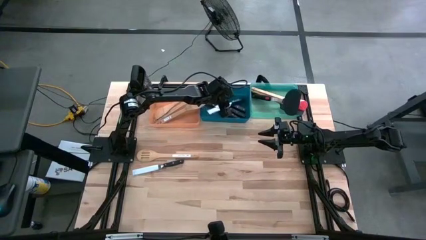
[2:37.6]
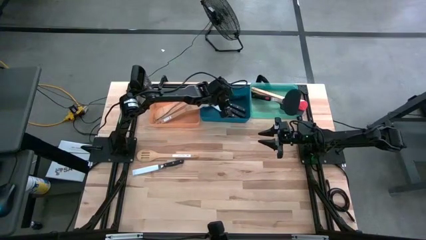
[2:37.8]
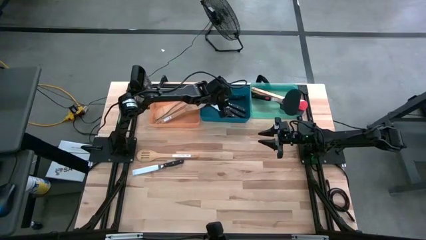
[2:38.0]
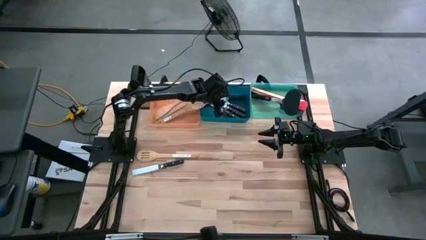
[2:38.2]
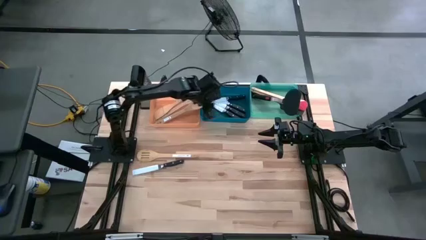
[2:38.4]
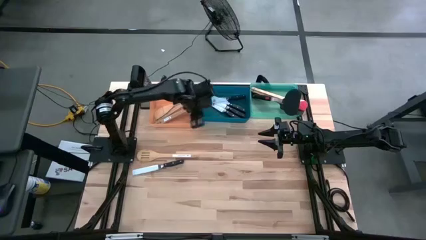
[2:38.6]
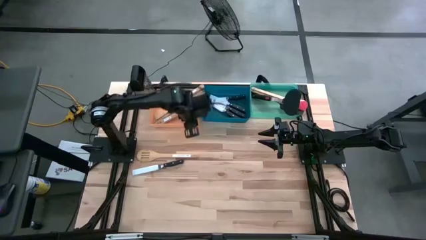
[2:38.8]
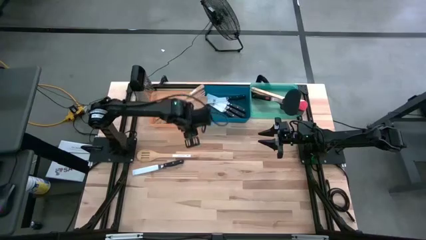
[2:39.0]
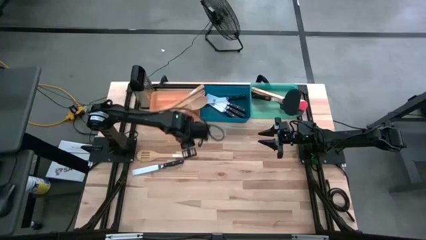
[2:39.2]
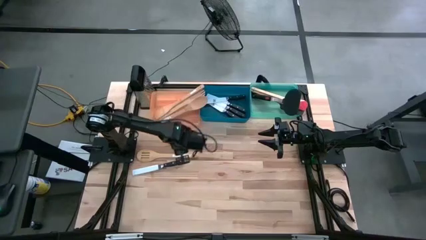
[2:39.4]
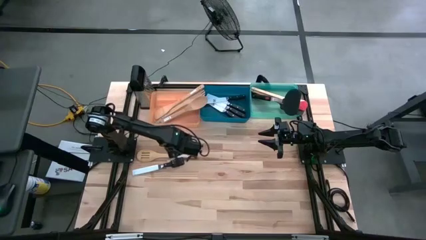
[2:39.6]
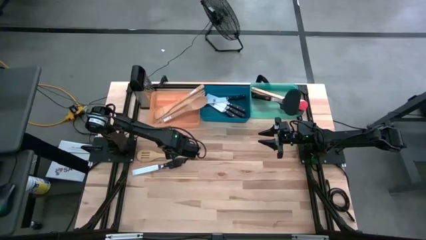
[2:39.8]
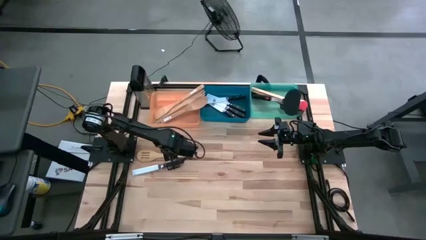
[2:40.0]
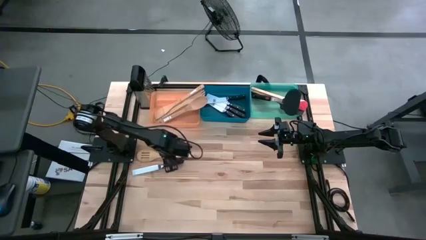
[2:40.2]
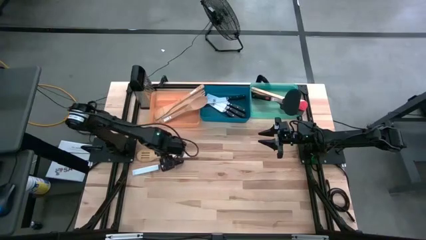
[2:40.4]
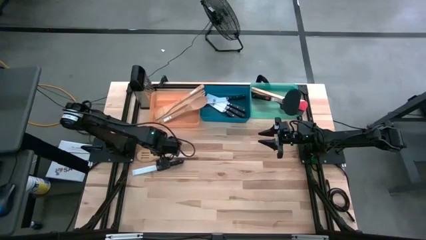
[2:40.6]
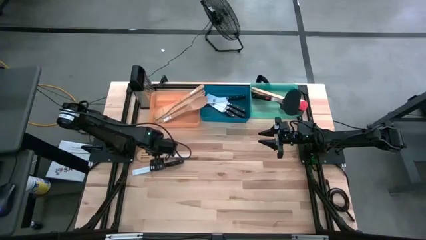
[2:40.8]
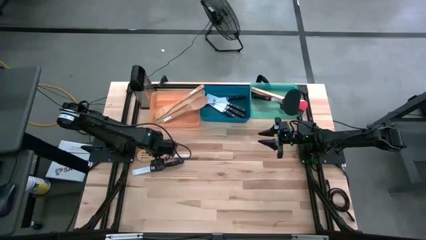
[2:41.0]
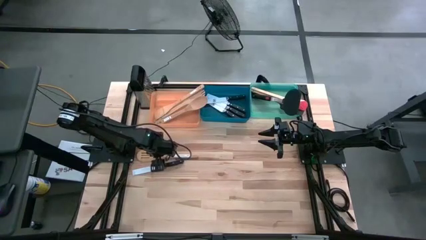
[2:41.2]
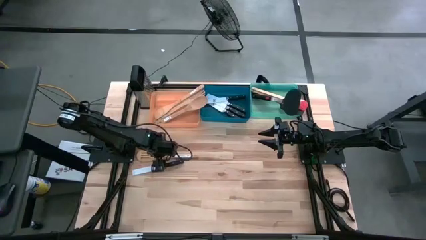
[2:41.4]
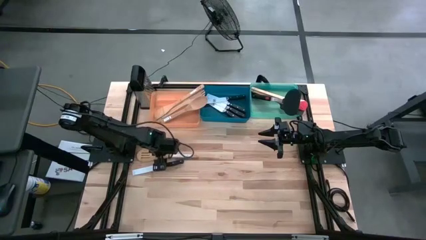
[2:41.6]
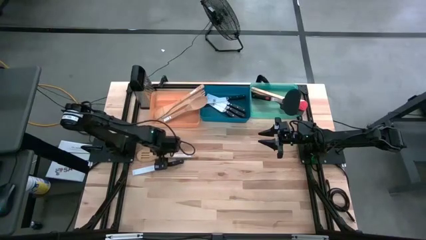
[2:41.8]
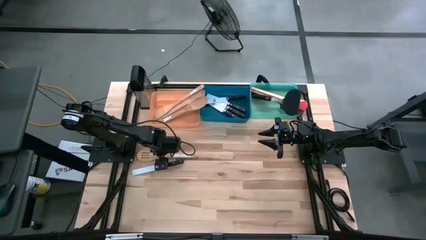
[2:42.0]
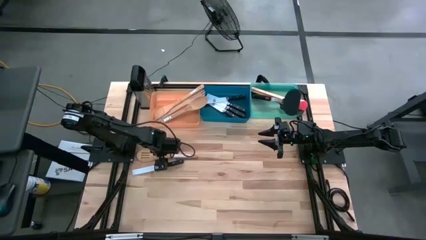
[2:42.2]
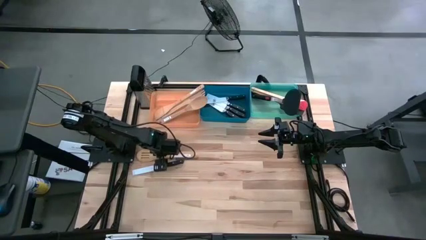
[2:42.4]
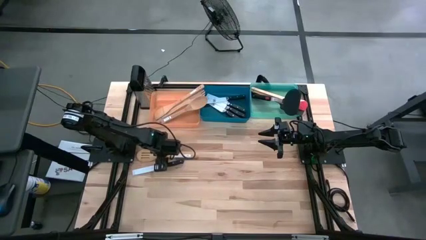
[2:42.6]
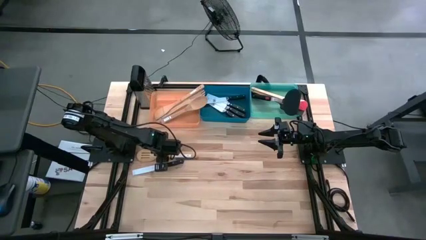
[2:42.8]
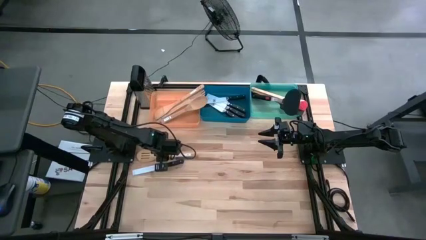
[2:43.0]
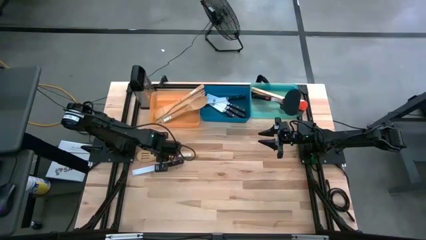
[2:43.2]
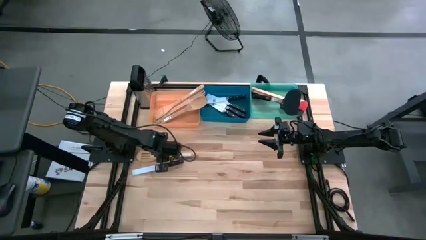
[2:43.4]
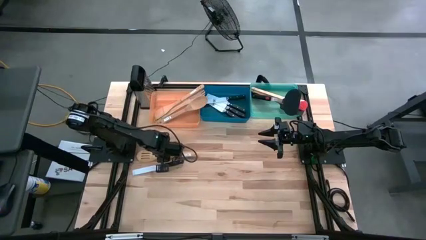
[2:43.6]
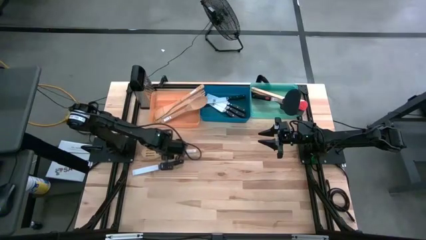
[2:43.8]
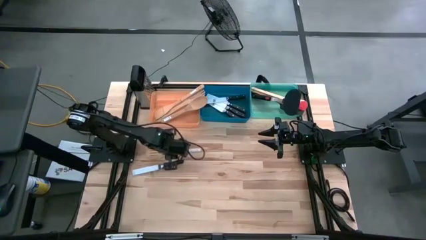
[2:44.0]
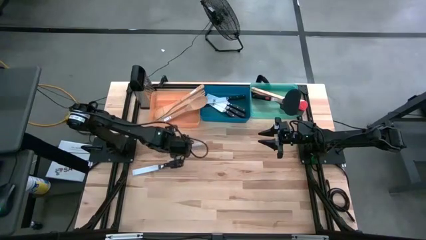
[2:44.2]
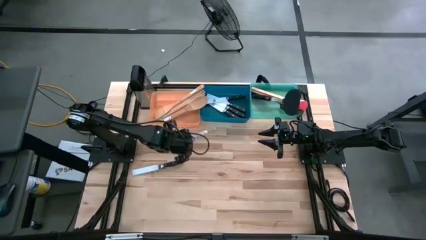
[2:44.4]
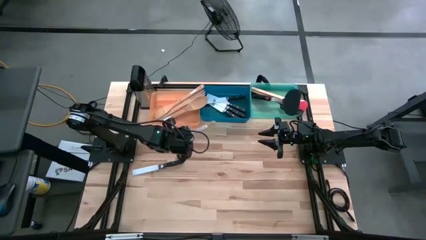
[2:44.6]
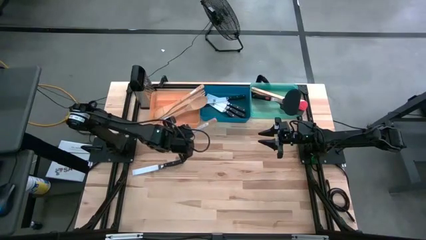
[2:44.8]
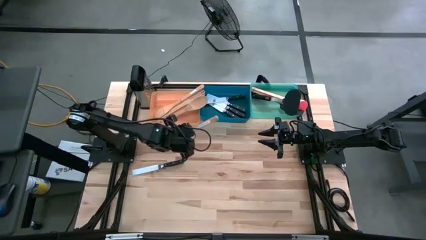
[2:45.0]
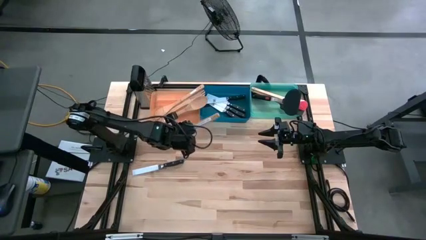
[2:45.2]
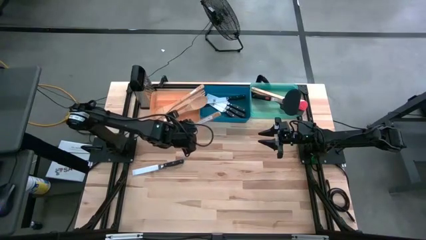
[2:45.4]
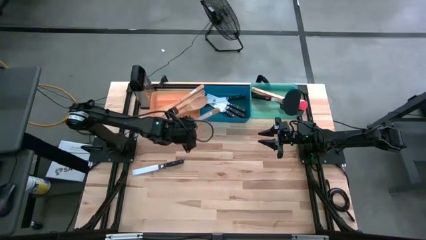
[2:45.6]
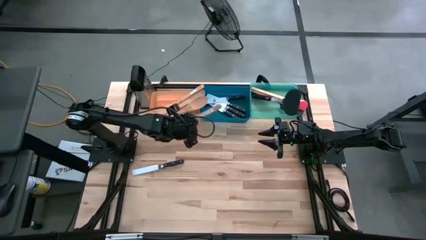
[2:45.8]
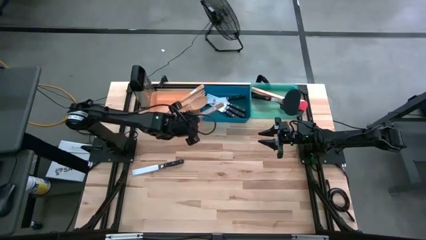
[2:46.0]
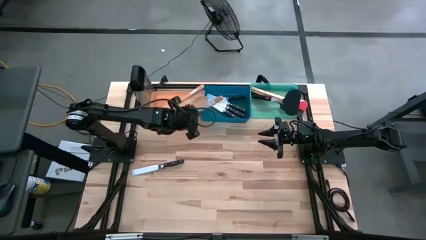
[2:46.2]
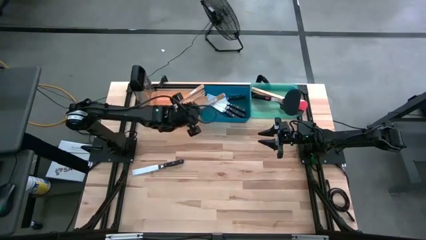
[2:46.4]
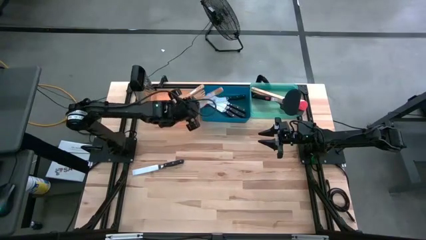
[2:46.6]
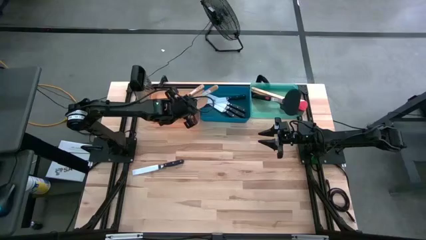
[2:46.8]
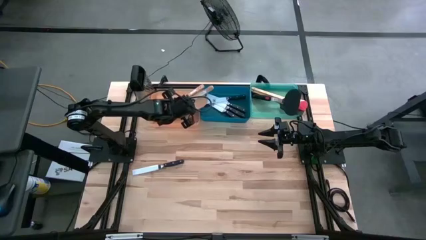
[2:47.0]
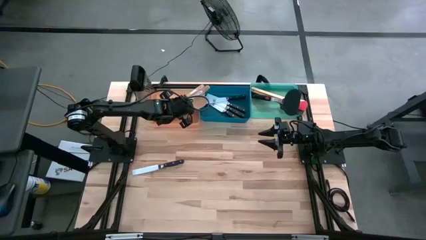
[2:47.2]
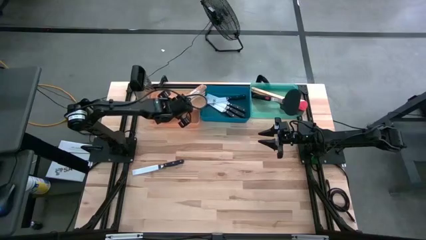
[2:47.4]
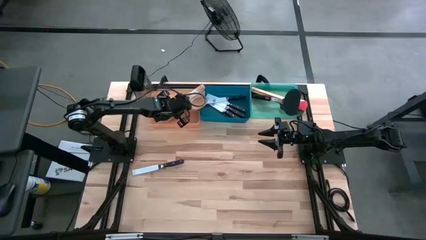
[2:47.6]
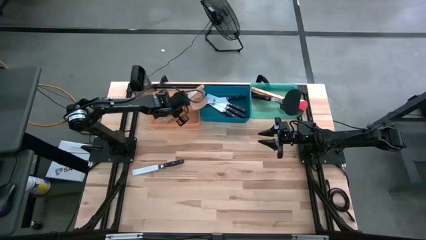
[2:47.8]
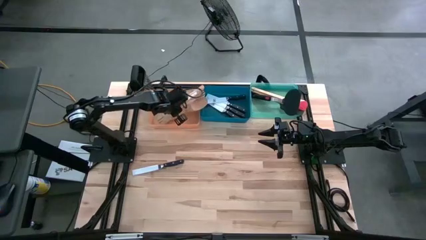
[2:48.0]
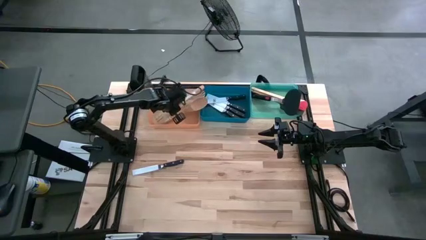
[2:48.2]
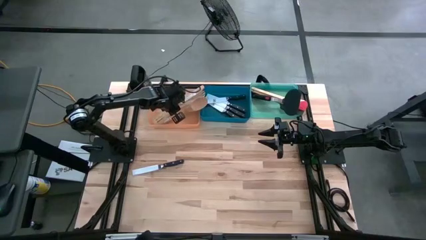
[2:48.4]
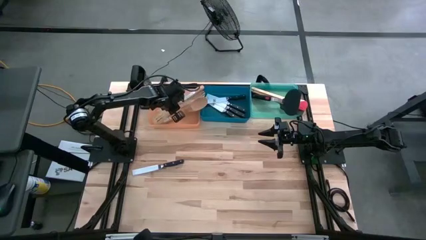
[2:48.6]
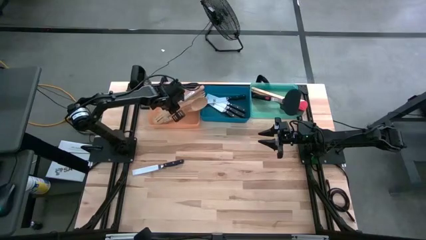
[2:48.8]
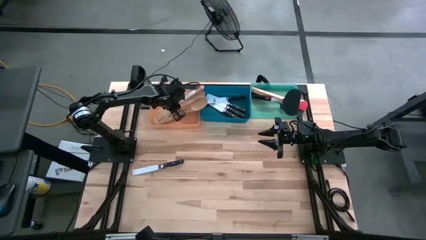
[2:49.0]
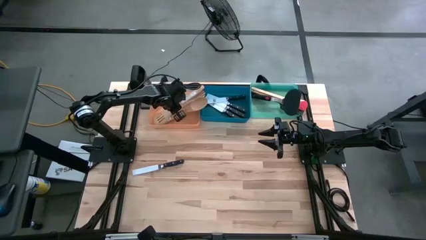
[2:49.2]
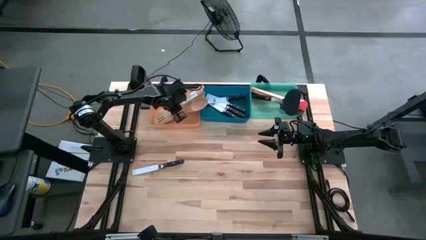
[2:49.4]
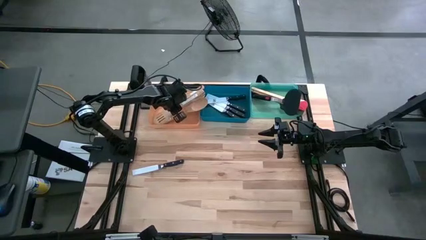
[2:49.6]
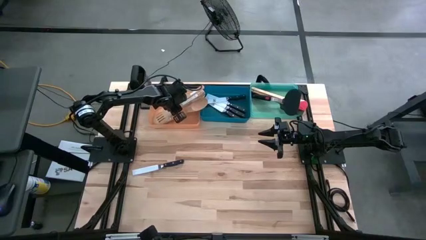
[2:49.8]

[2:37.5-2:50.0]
Task: Pick & Place Kitchen Items
Put the wooden serving spoon into the orange bin

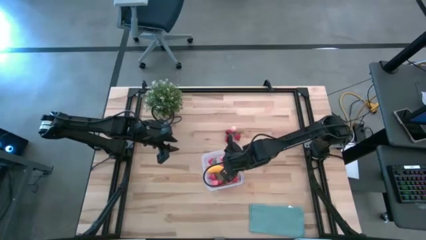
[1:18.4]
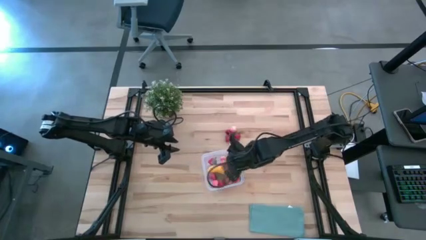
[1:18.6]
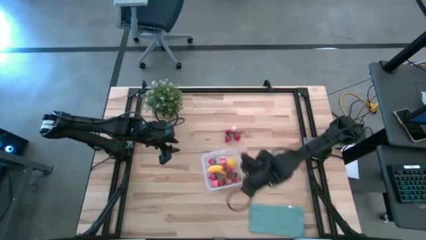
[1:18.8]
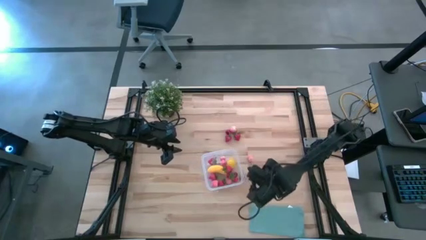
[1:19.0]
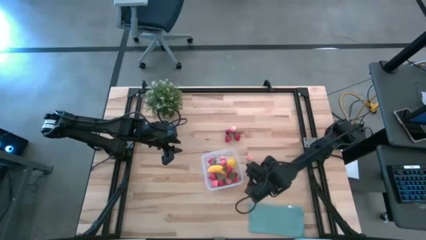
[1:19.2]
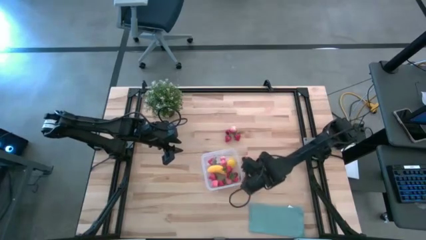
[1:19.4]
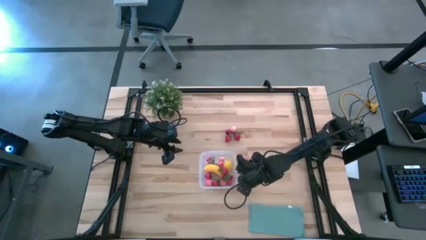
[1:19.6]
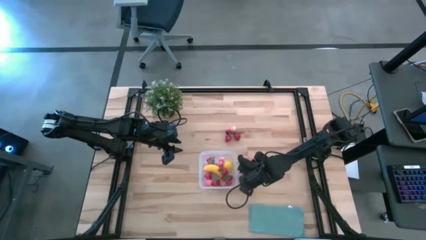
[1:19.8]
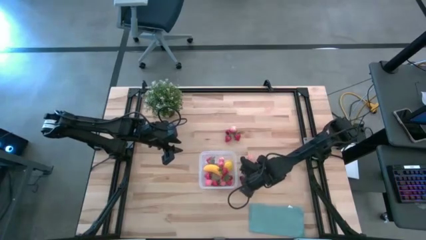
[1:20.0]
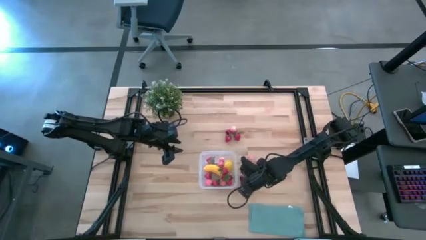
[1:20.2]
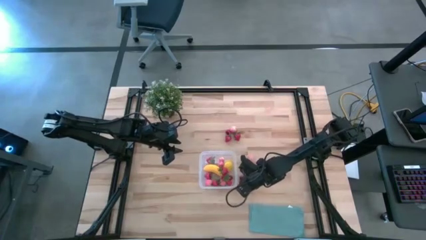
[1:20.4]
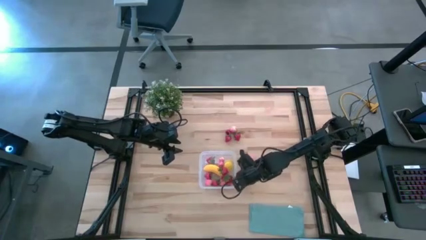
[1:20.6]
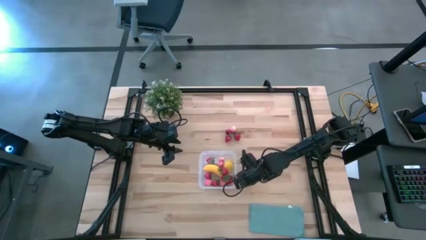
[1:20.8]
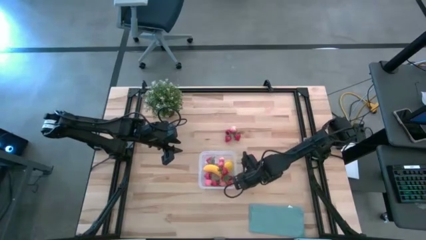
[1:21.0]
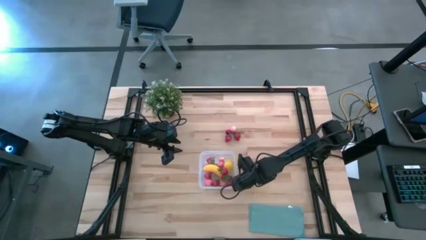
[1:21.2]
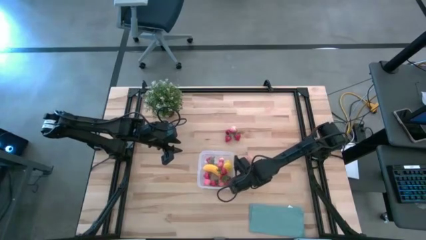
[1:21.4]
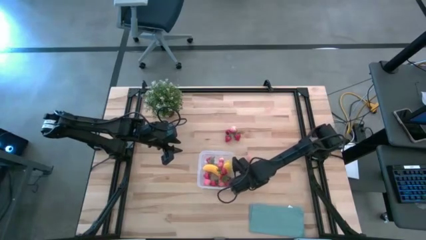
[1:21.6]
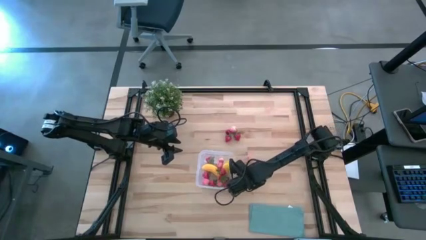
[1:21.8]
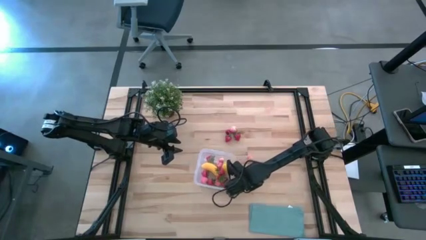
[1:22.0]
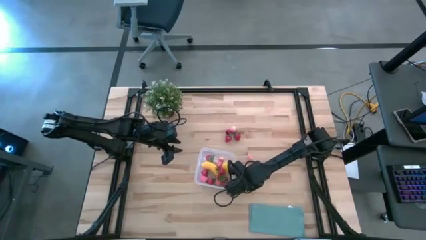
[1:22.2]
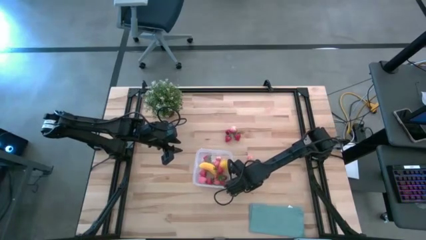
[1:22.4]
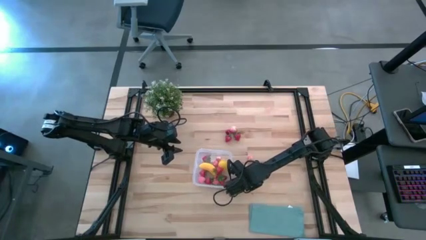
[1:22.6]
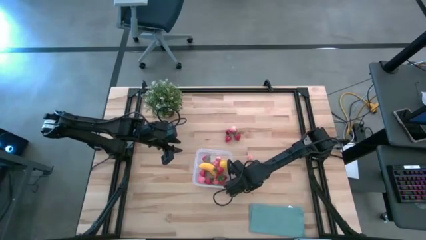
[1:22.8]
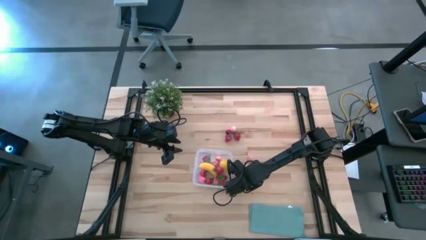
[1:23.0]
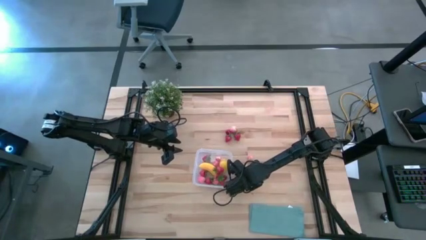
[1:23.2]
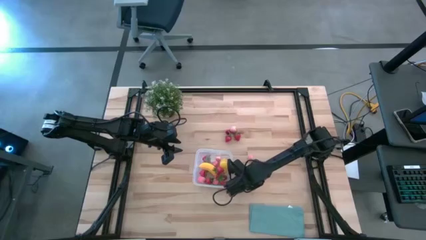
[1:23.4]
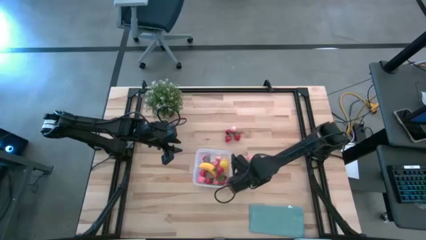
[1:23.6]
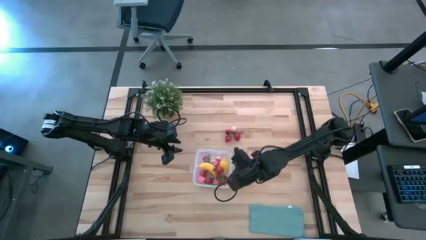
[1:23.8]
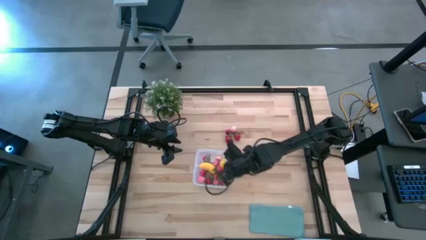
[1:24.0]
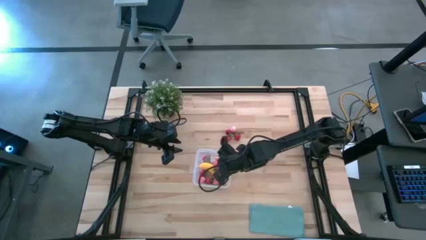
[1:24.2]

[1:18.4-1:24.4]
Task: Pick and placing Produce into tupperware
Put the red cherry into the transparent container
